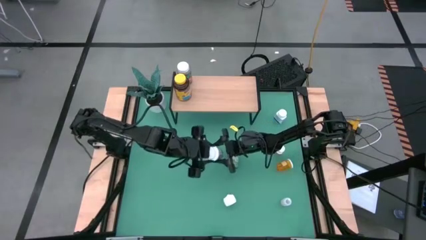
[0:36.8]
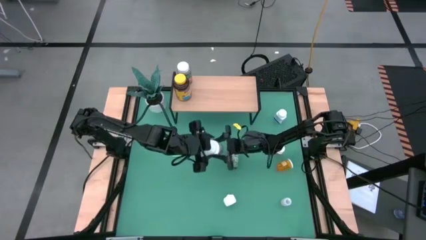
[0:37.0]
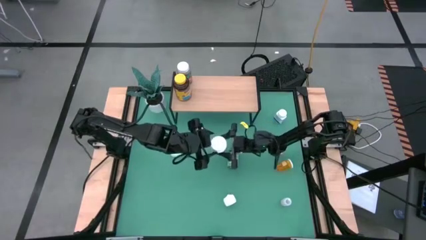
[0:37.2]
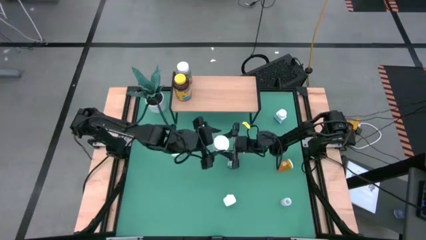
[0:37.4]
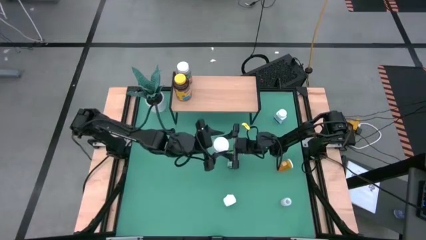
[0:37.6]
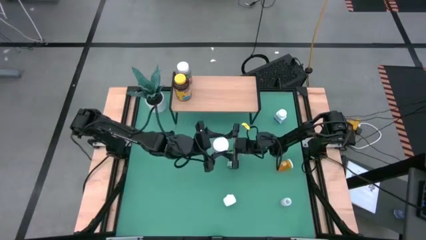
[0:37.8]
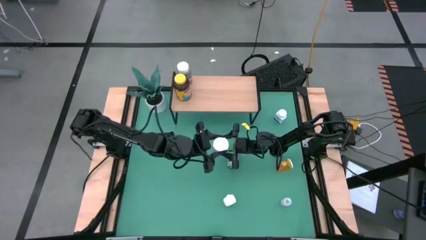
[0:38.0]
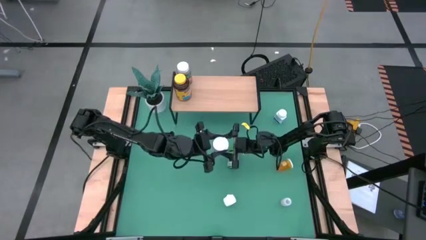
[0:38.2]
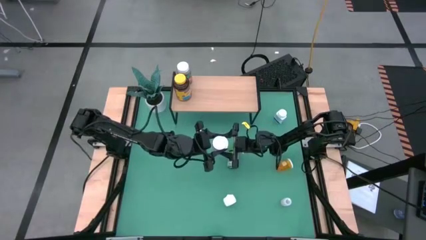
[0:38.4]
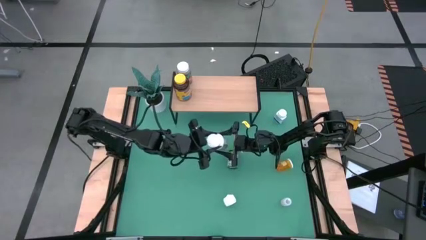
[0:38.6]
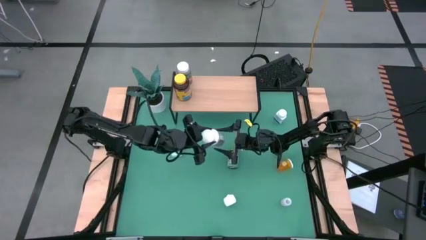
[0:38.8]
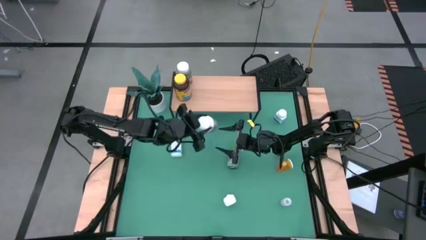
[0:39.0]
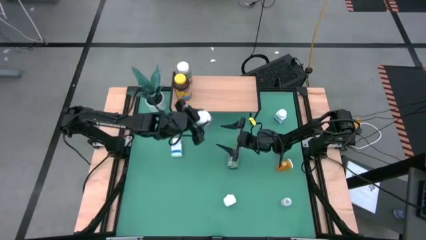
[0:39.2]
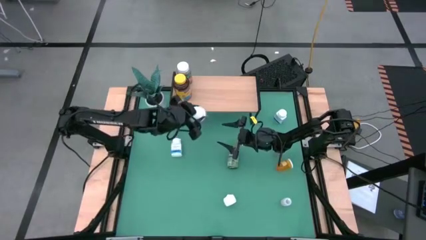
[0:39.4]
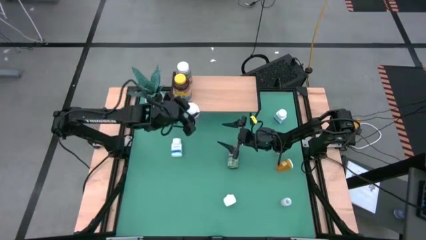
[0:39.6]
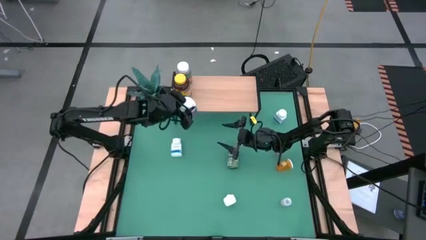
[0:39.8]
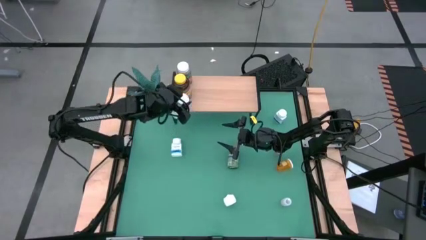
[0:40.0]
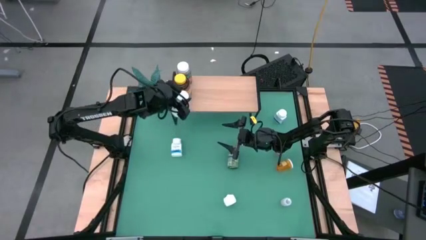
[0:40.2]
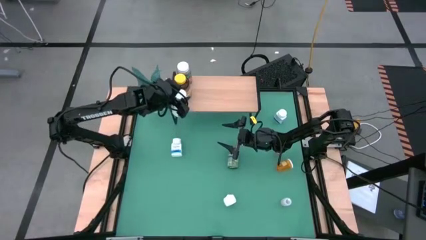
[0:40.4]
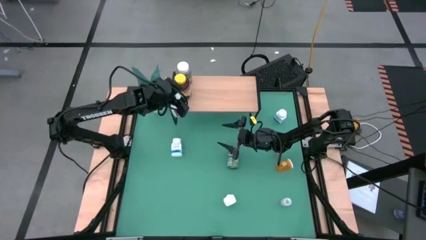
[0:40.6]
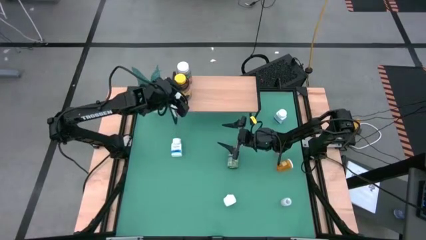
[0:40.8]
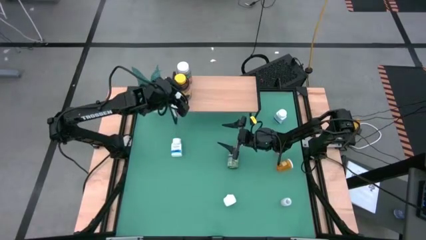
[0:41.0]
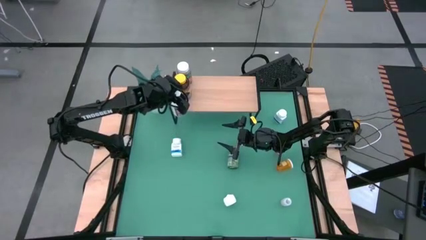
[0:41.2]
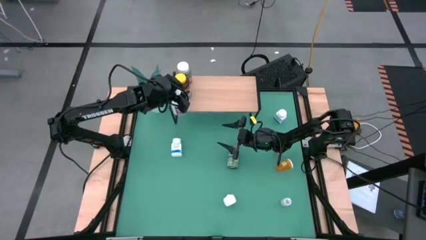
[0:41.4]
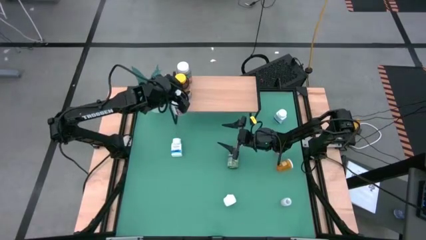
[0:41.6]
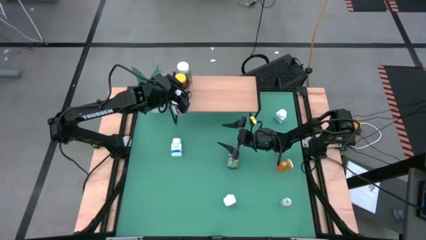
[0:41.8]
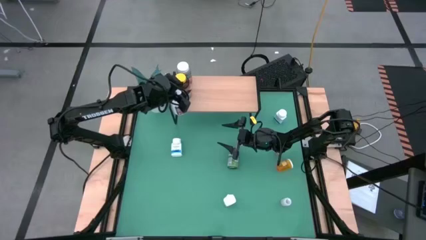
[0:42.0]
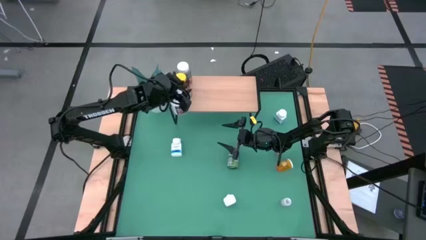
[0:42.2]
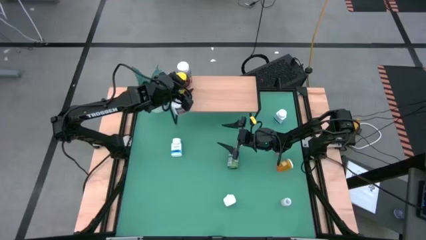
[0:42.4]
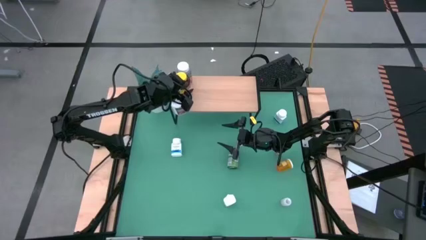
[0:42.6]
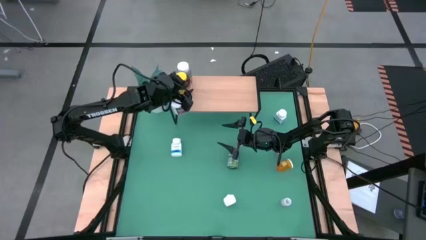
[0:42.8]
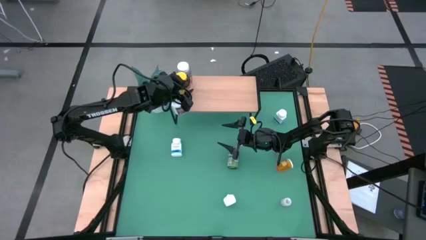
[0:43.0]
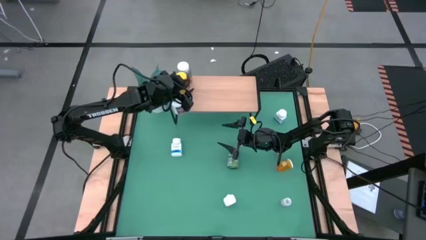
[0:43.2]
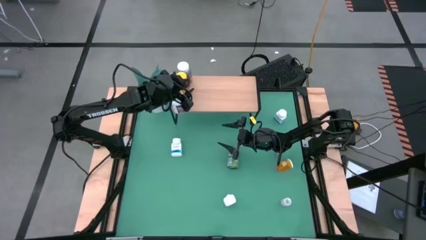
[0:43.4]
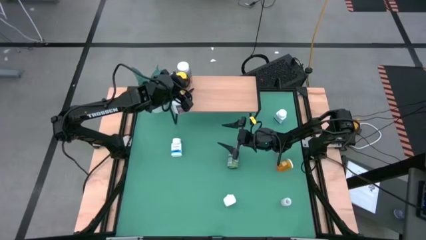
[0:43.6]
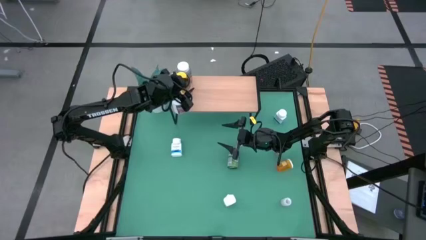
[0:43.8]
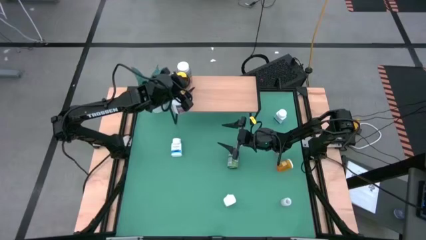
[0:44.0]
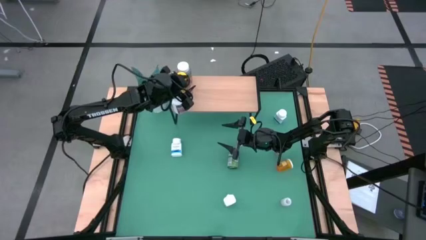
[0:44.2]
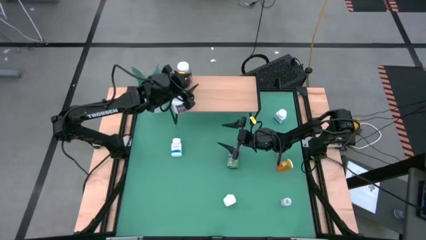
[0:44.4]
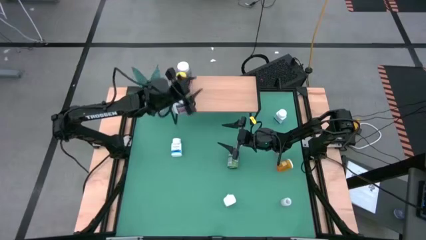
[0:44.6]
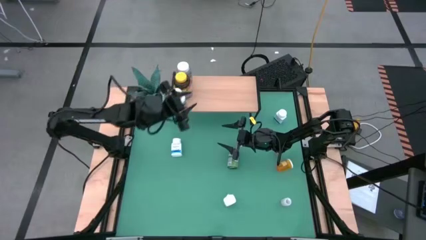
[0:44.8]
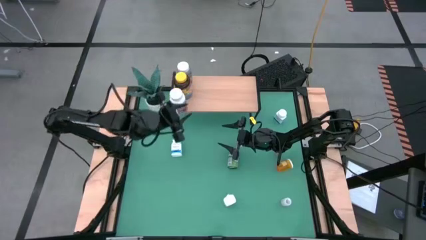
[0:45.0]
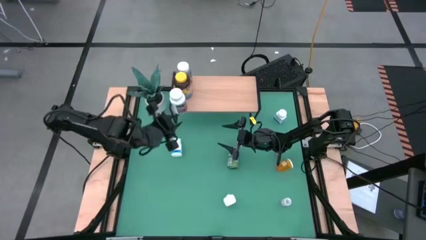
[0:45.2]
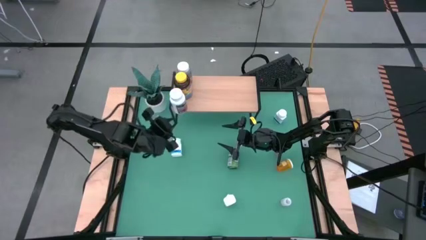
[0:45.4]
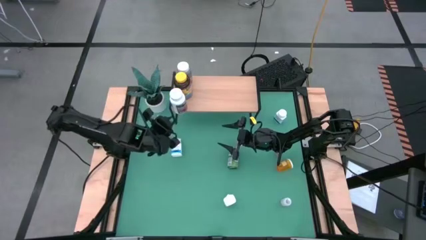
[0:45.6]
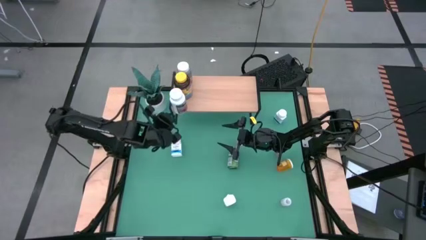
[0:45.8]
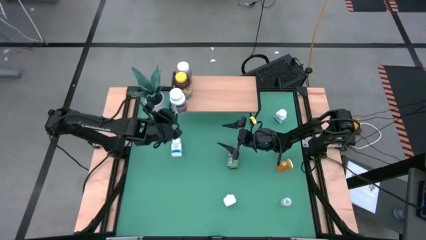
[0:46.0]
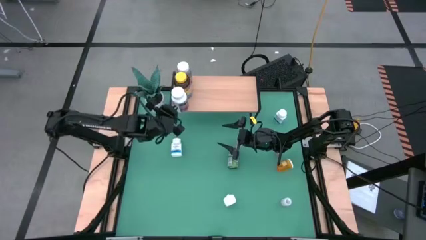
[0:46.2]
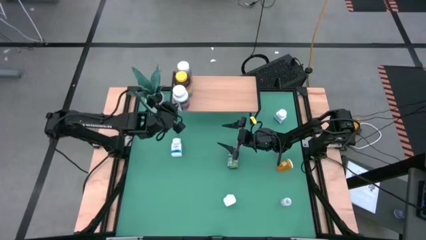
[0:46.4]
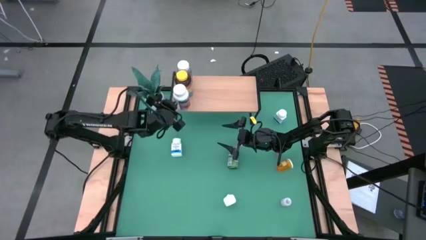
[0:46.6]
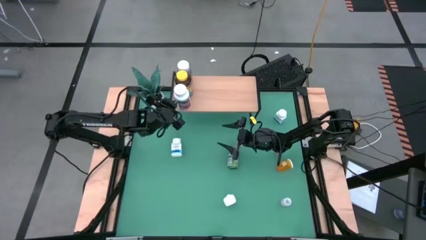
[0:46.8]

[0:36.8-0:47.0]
Task: Pick and place medicine bottles onto shelf by color
Put the violet pill bottle on the shelf

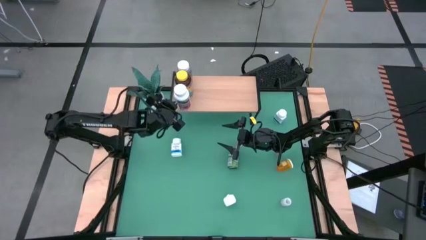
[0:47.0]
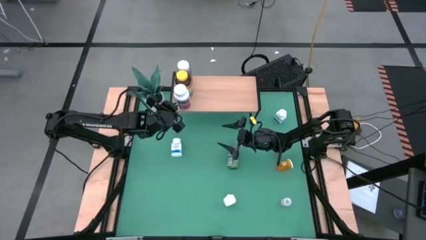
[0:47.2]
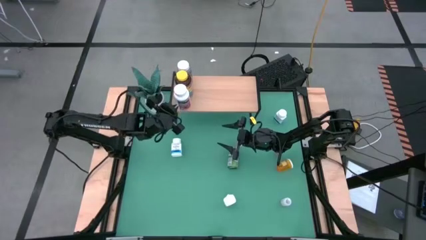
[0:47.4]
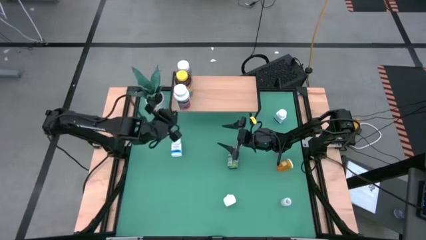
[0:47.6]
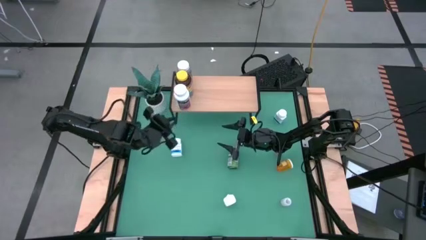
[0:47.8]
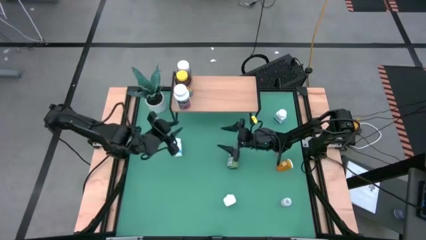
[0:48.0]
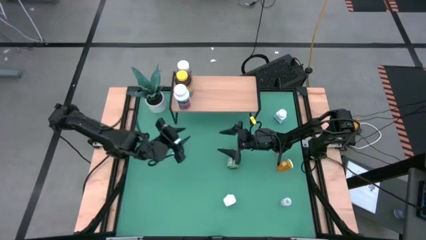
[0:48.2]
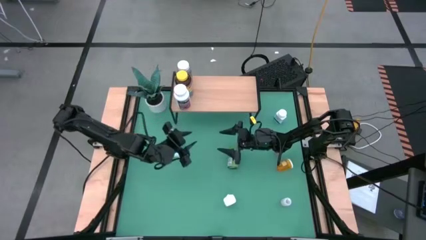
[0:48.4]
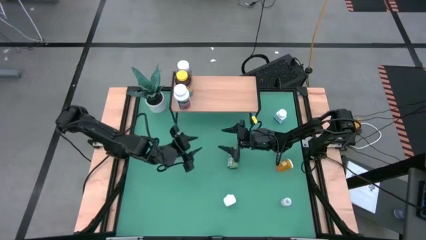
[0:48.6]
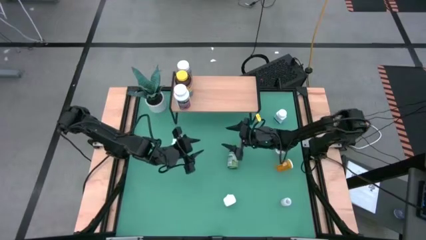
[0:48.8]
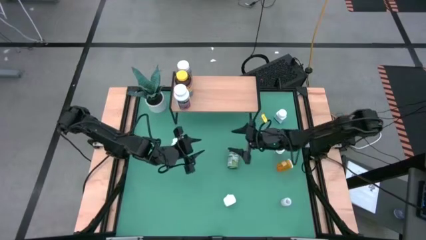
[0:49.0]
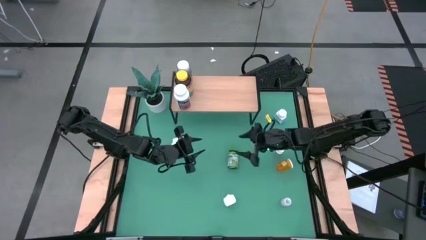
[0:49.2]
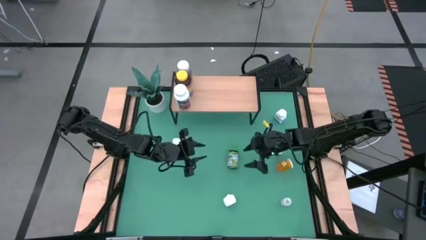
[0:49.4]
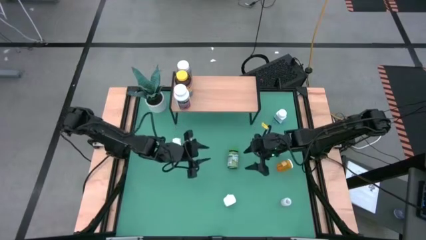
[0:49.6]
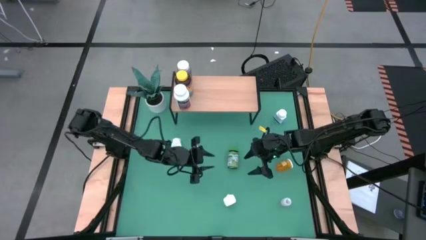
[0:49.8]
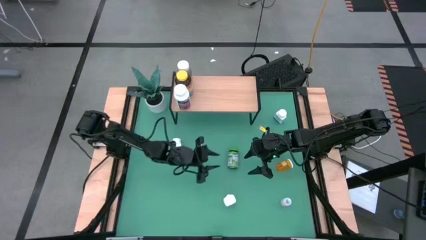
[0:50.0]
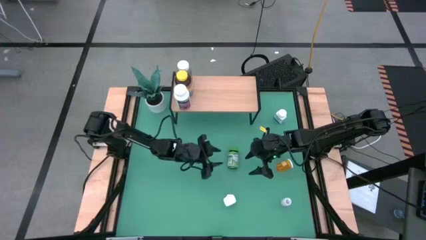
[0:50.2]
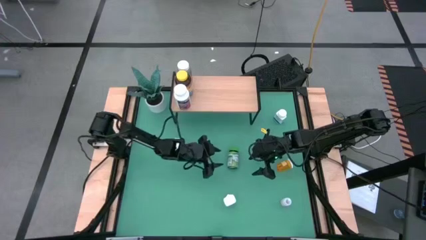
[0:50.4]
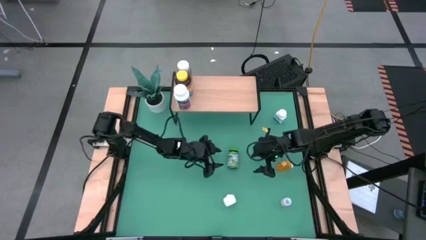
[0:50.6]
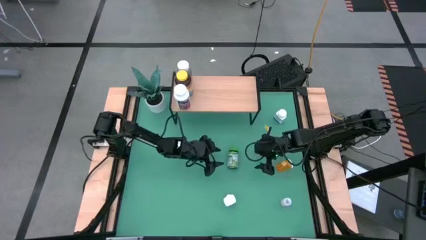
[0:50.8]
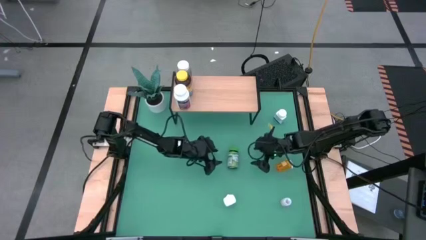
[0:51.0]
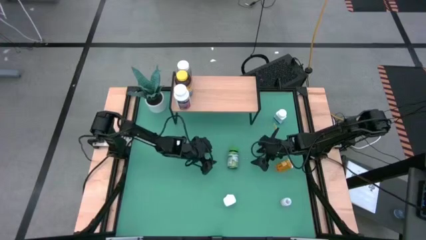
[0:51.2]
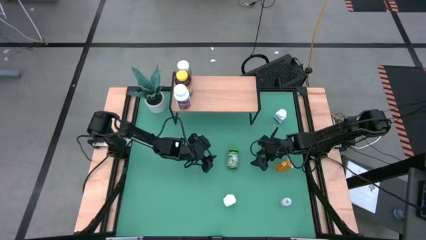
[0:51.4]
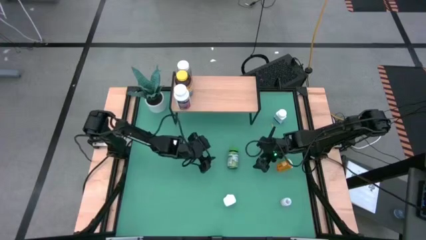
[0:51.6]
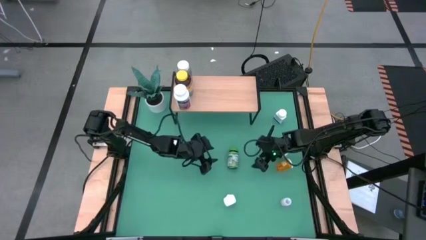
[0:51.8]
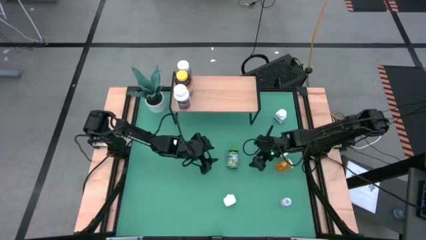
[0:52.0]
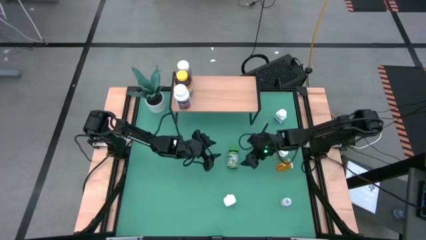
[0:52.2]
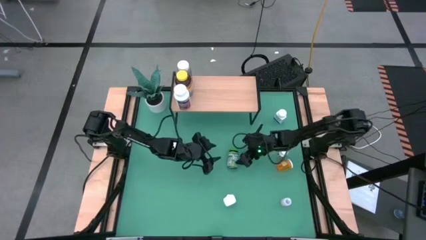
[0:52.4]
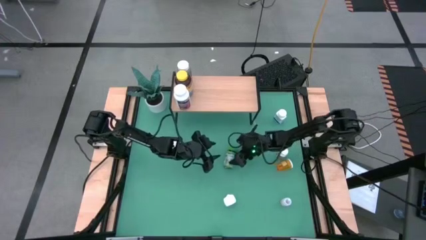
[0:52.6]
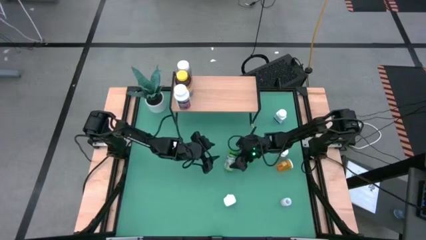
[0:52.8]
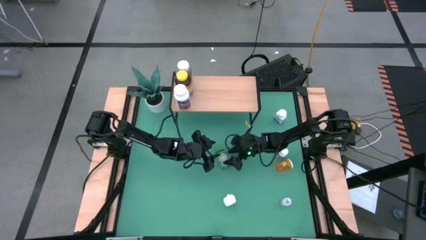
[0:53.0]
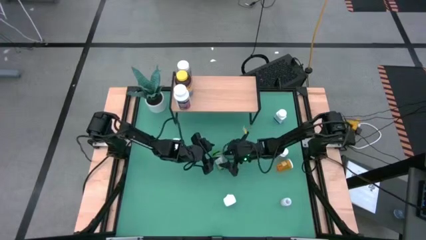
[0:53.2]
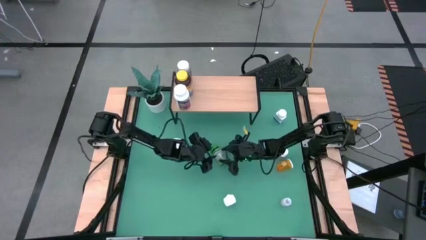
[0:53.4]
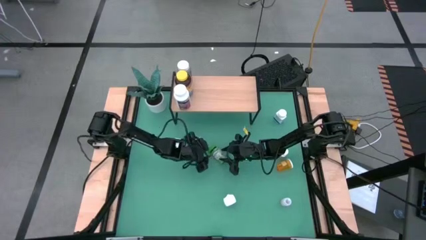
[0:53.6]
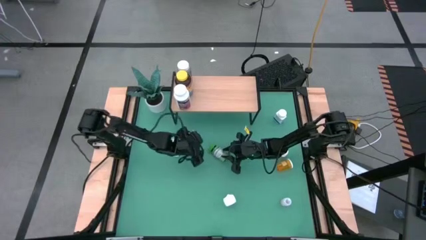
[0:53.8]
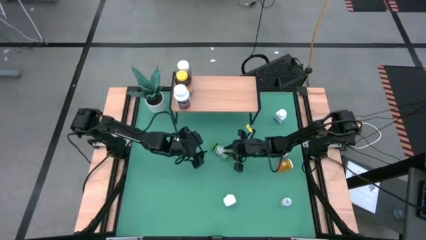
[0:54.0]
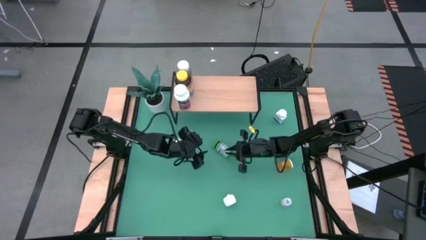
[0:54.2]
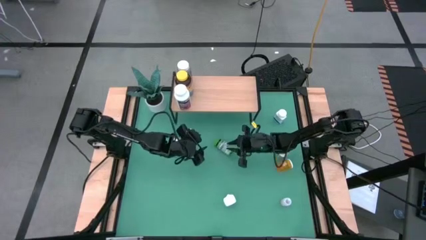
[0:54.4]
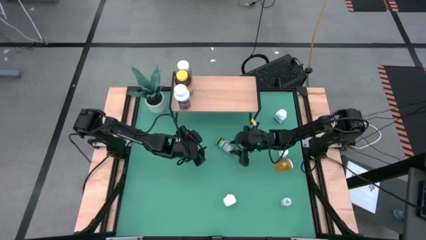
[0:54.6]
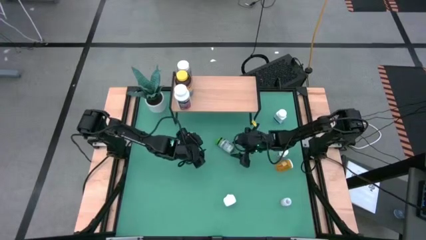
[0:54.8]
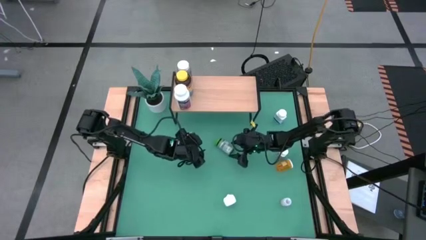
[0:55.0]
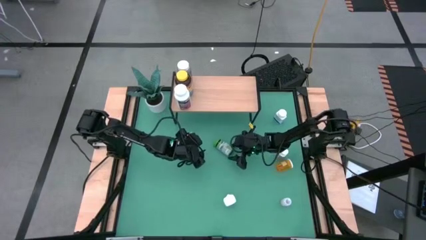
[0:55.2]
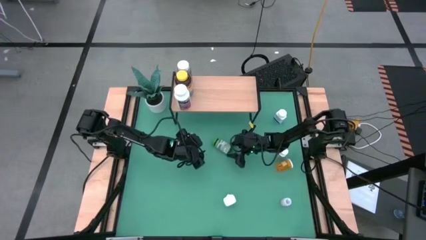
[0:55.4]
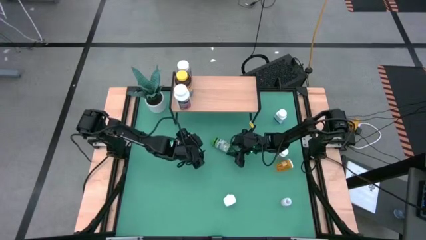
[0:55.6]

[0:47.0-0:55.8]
Put the light green pill bottle on the shelf
